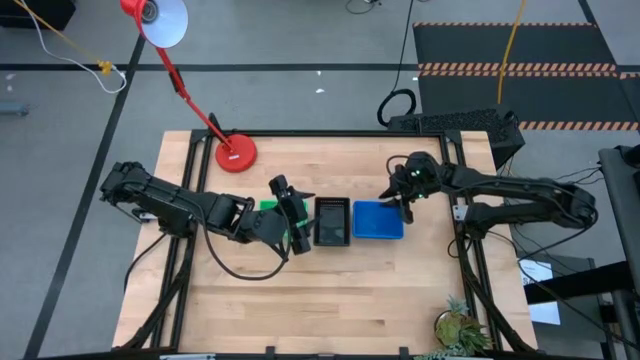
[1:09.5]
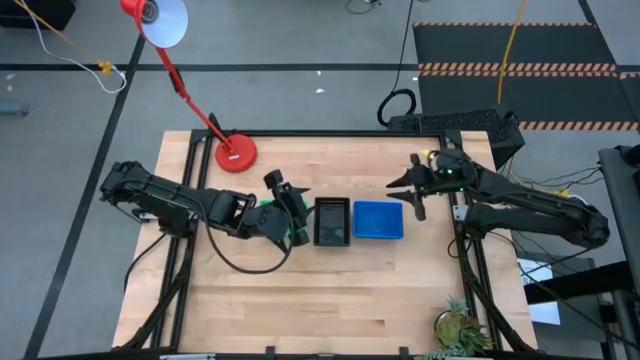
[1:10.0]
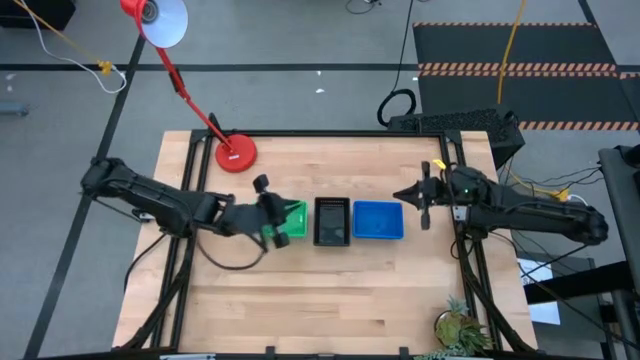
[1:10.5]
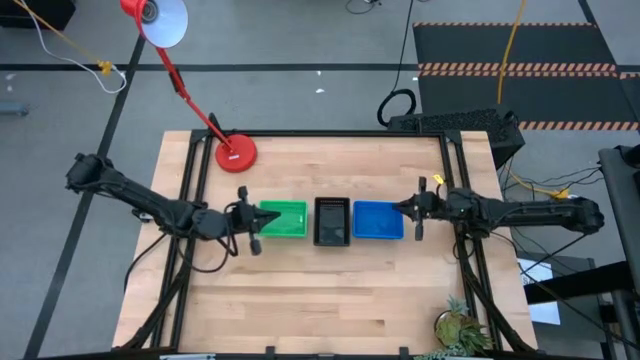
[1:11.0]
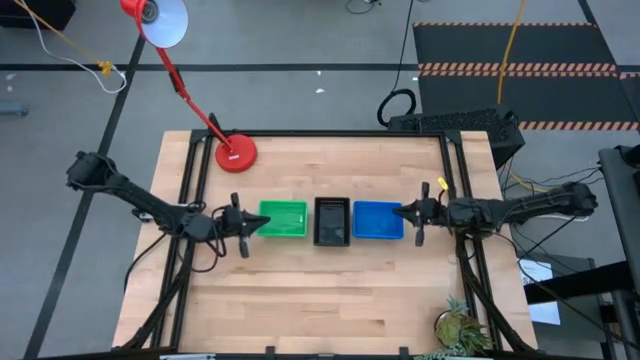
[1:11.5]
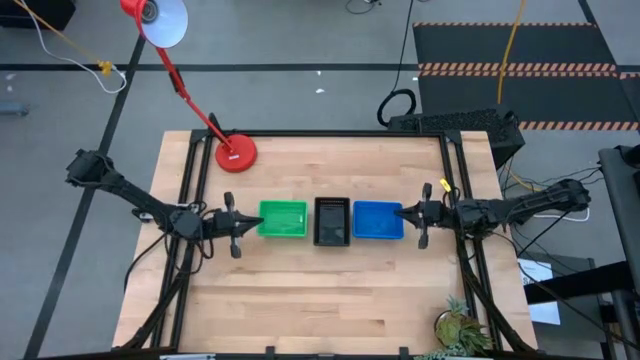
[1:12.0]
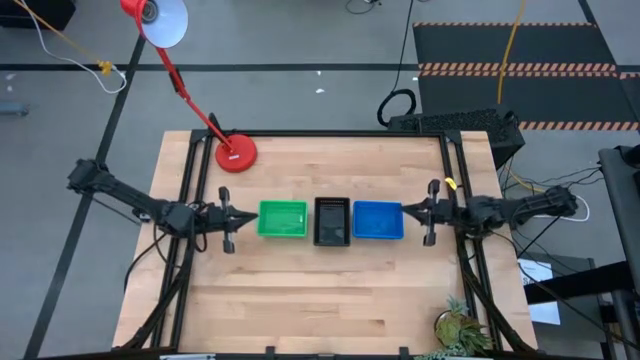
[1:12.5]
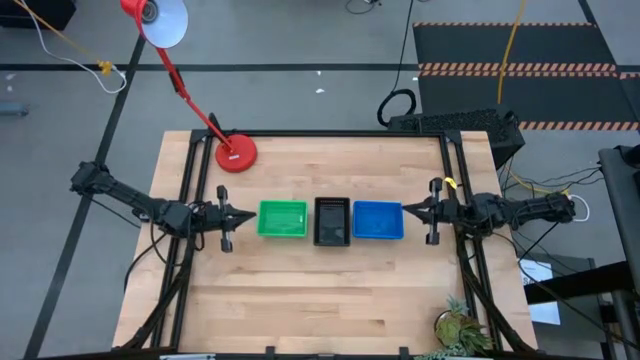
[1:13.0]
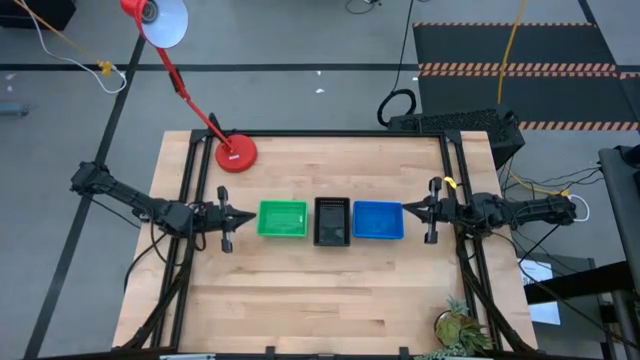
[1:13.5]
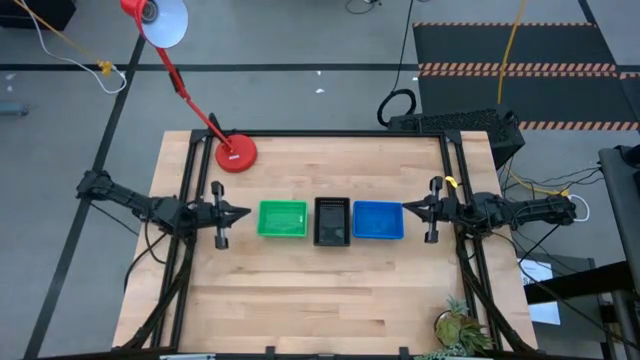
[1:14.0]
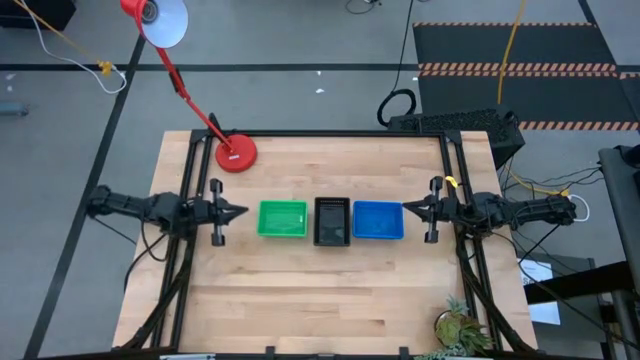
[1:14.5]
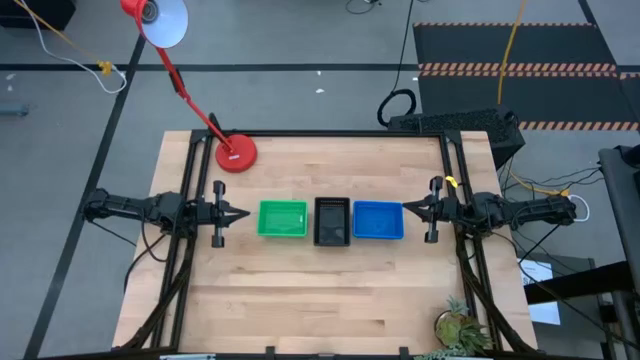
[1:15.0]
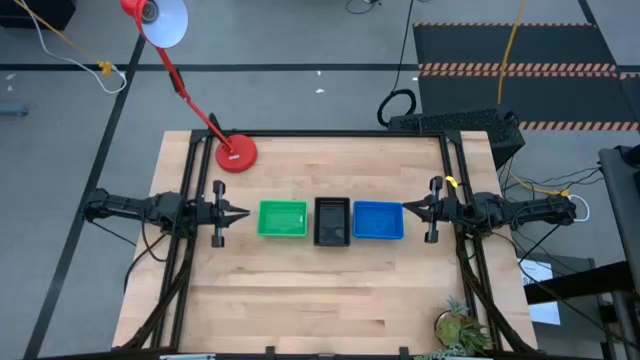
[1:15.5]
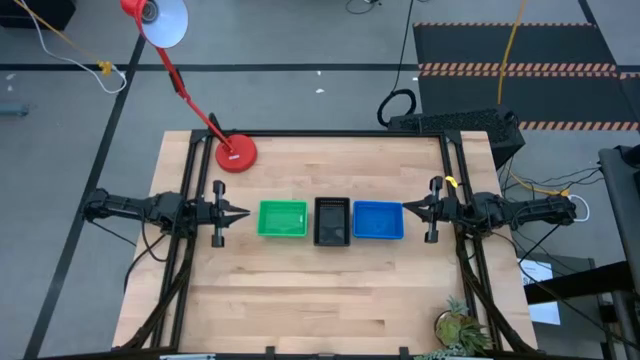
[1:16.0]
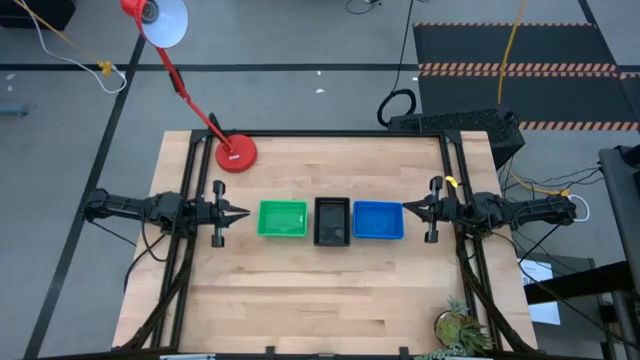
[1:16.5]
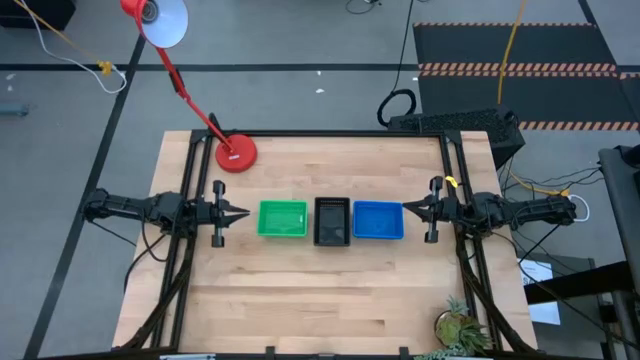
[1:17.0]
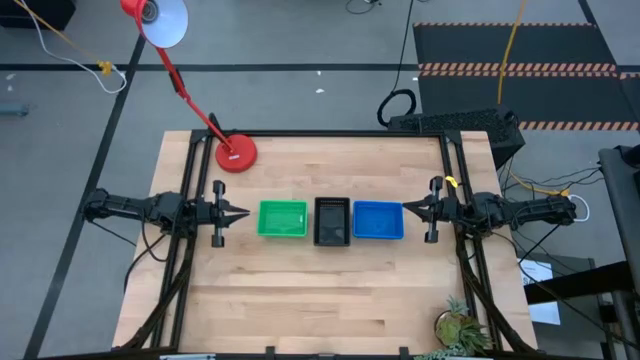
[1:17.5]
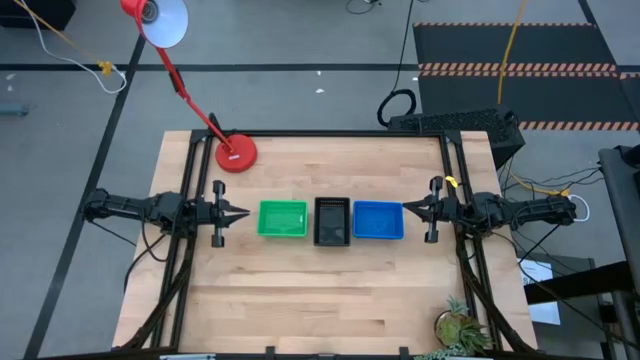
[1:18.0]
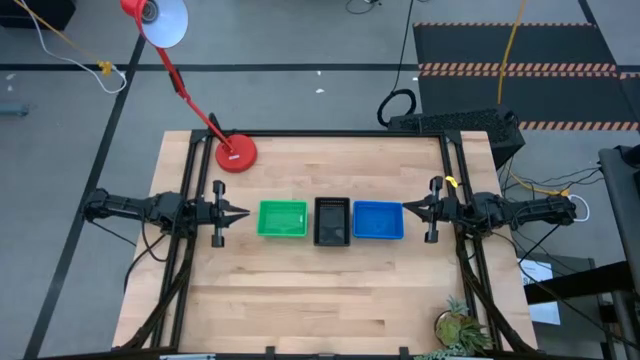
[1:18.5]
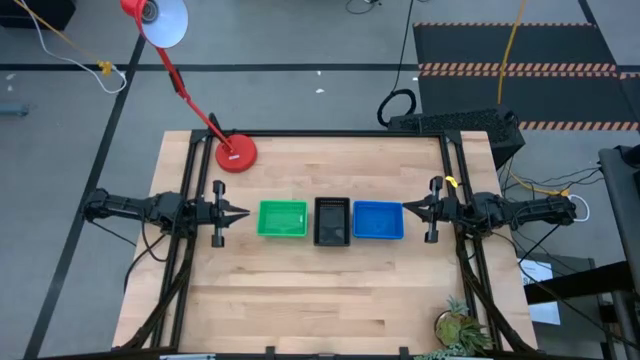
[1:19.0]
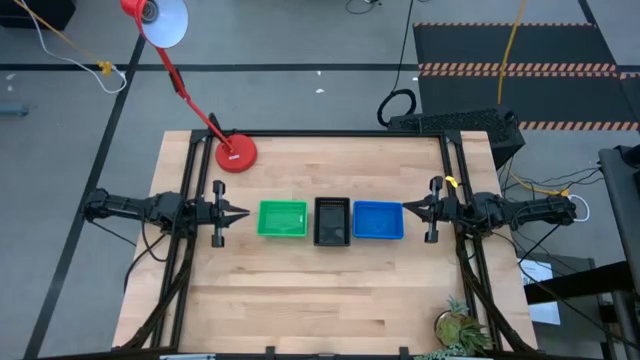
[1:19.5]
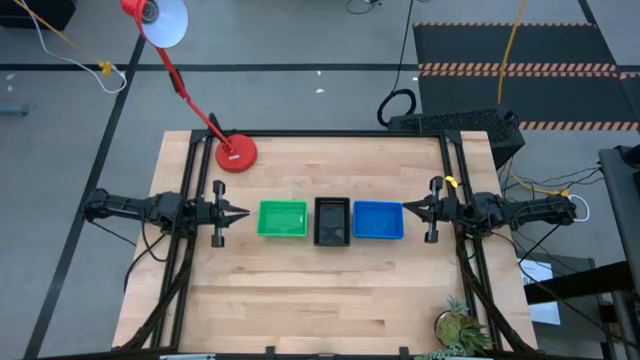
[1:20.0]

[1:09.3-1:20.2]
Return to Home Position

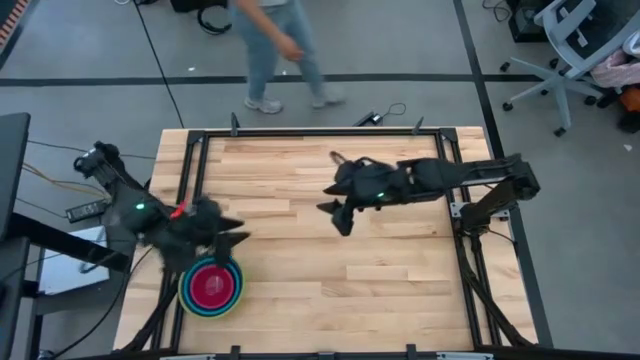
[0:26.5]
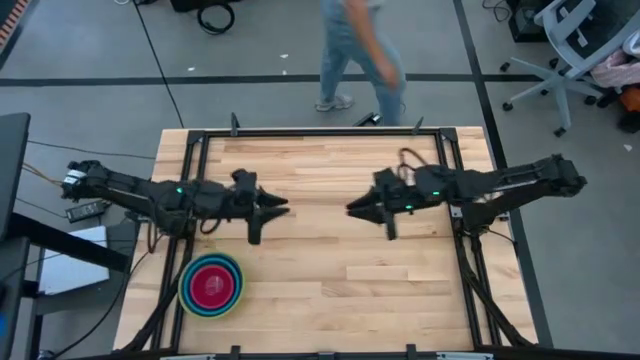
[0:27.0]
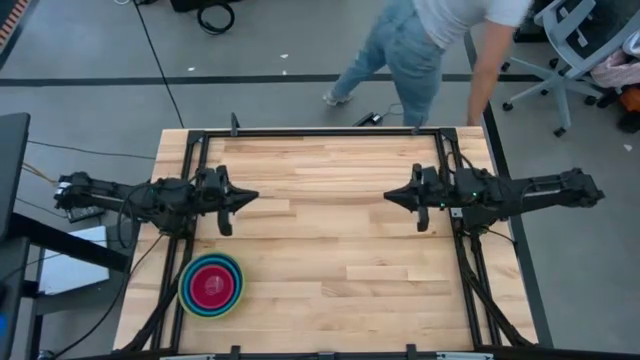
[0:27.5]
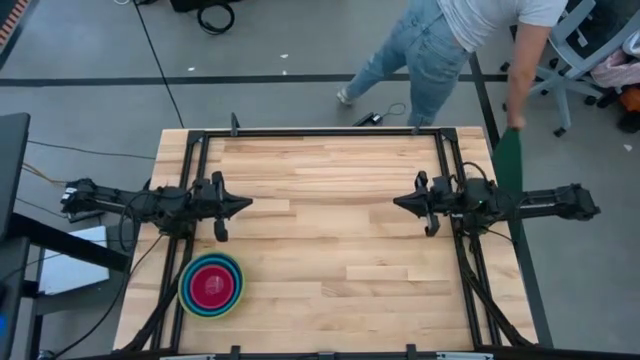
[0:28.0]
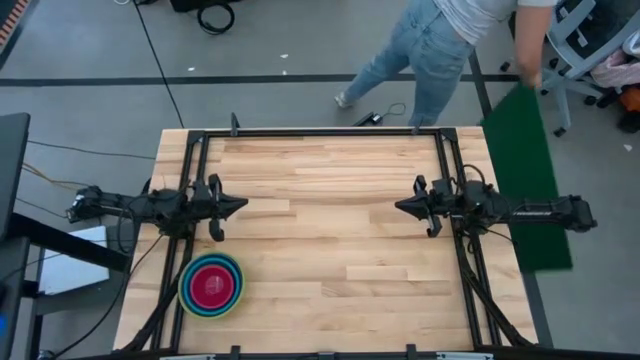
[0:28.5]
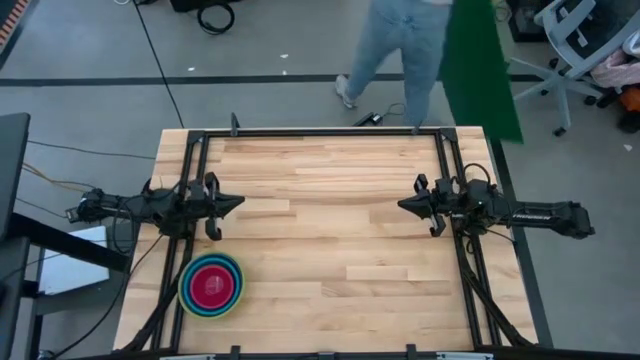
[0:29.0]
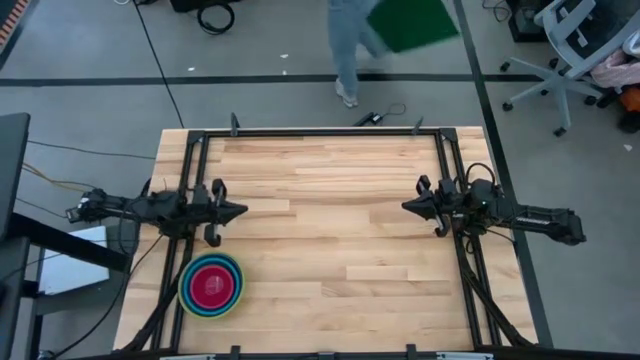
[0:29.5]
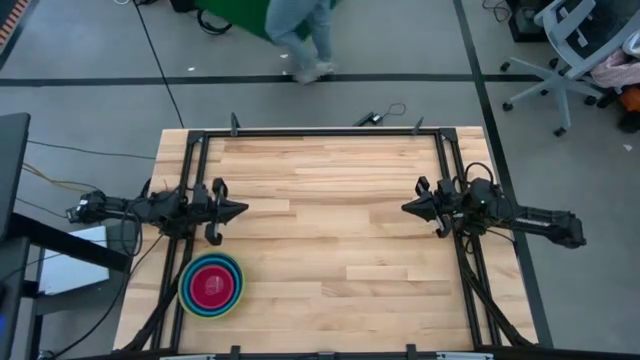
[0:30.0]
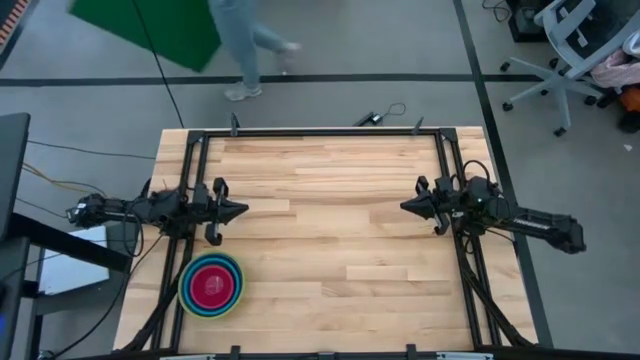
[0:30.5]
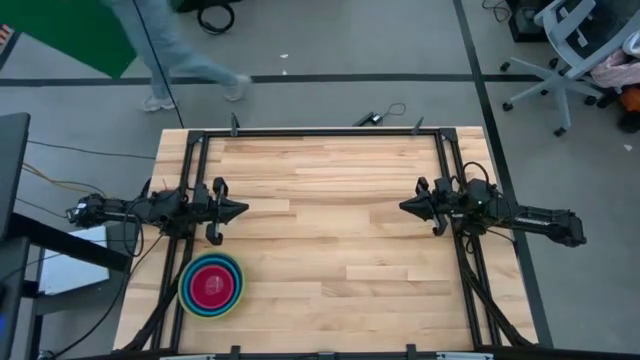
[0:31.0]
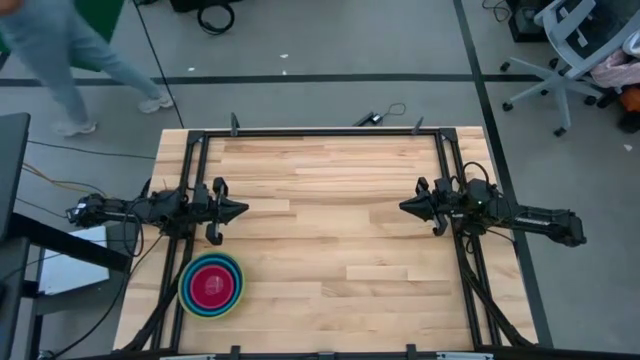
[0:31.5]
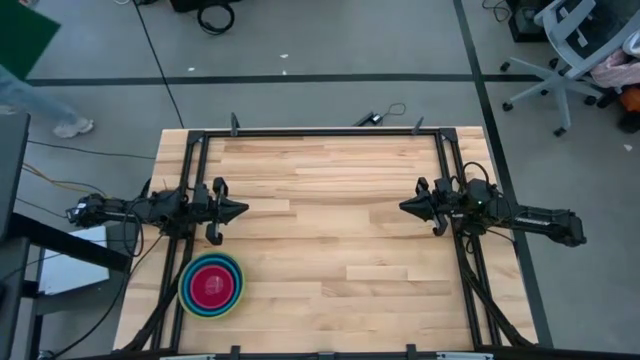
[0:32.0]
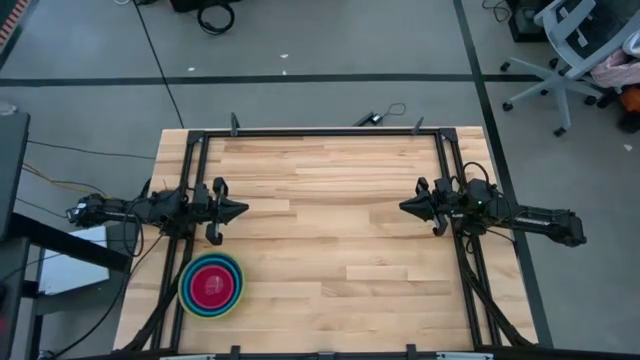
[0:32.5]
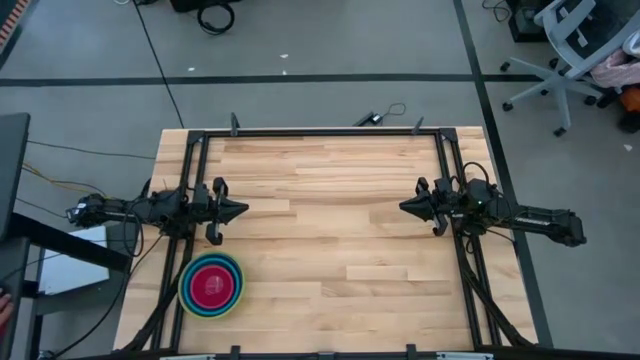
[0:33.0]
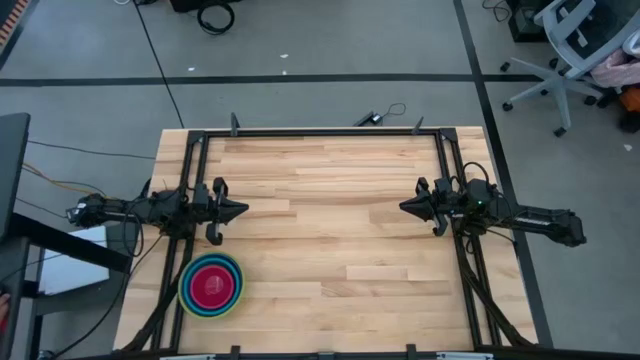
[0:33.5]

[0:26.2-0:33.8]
Return to Home Position
